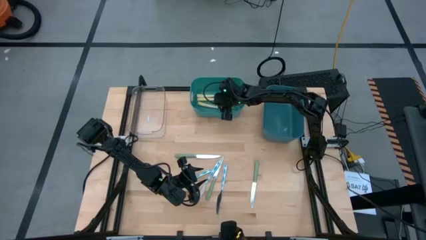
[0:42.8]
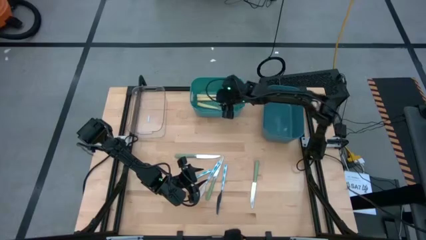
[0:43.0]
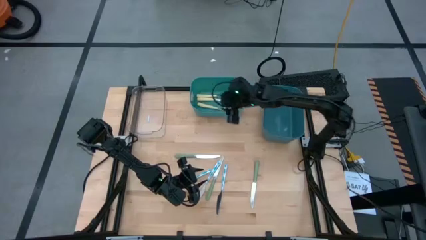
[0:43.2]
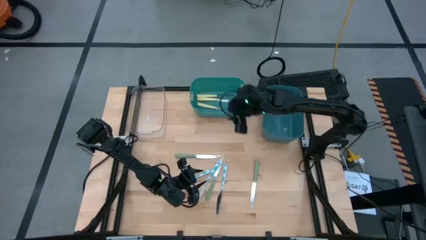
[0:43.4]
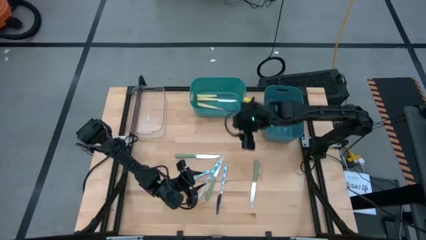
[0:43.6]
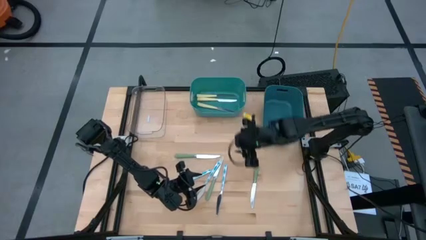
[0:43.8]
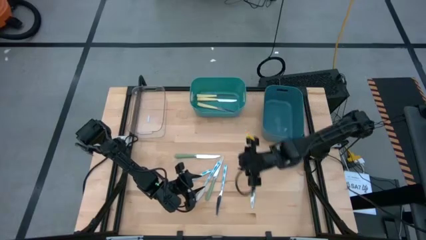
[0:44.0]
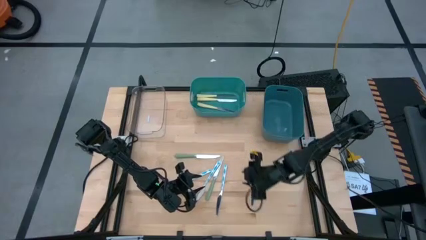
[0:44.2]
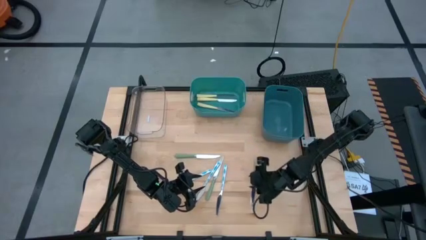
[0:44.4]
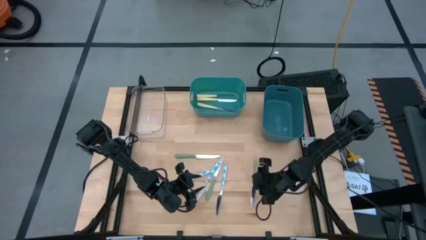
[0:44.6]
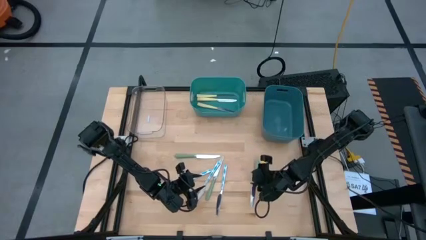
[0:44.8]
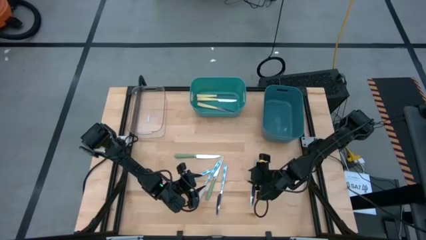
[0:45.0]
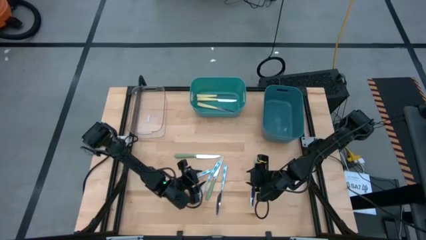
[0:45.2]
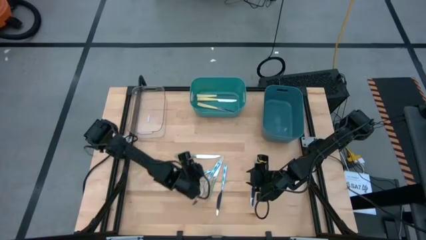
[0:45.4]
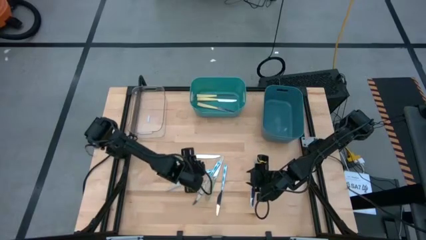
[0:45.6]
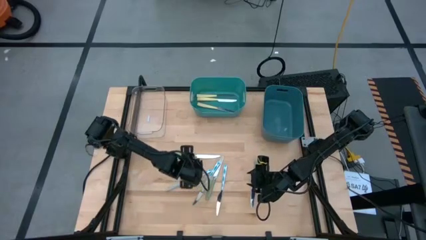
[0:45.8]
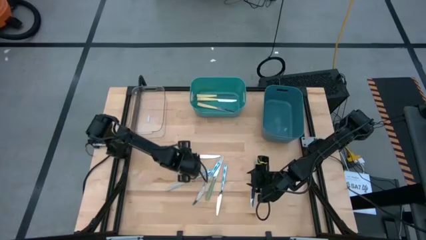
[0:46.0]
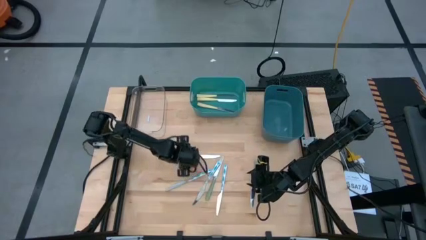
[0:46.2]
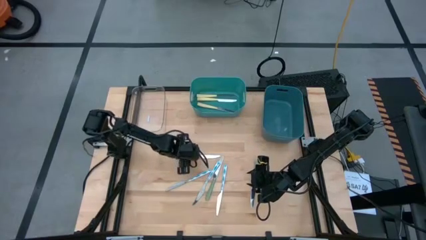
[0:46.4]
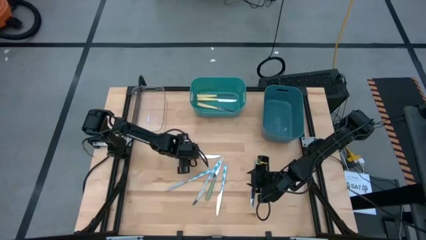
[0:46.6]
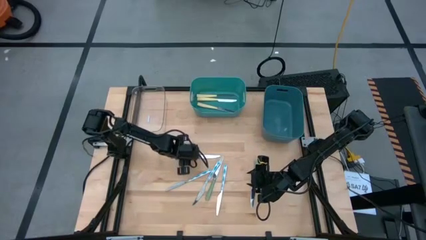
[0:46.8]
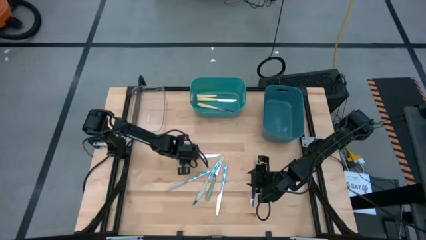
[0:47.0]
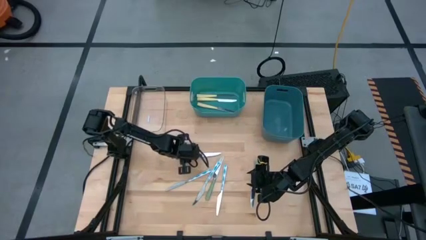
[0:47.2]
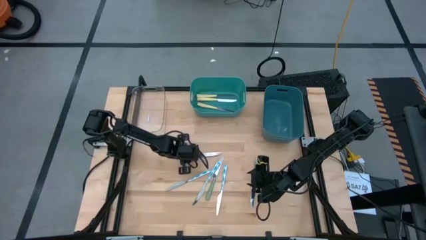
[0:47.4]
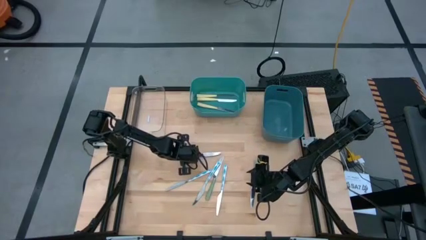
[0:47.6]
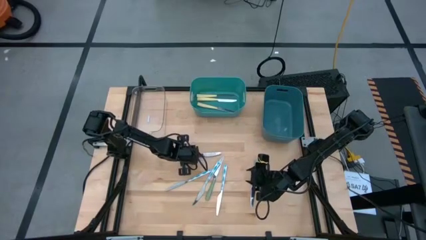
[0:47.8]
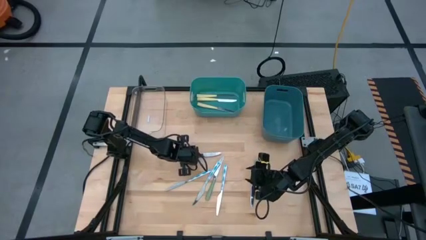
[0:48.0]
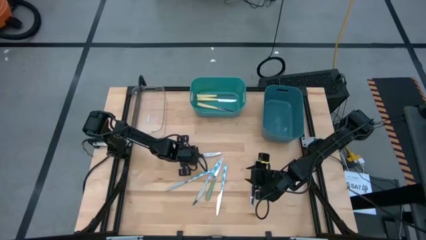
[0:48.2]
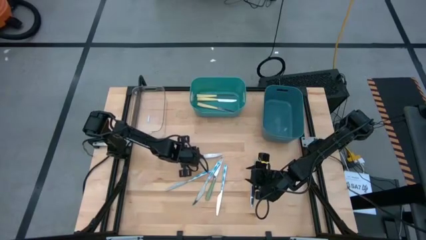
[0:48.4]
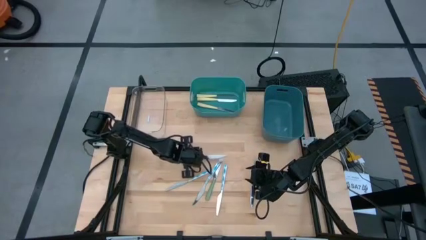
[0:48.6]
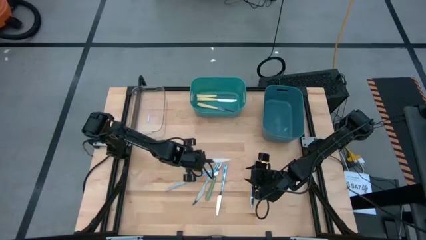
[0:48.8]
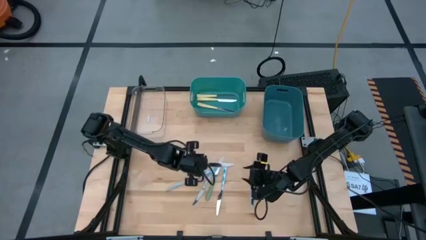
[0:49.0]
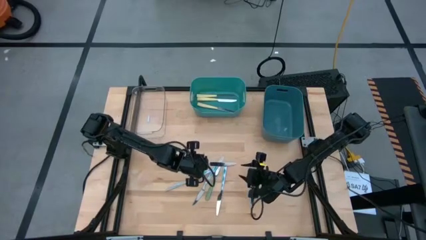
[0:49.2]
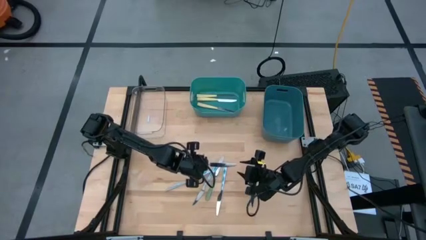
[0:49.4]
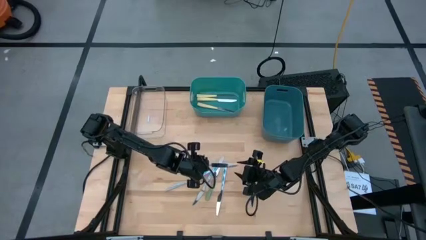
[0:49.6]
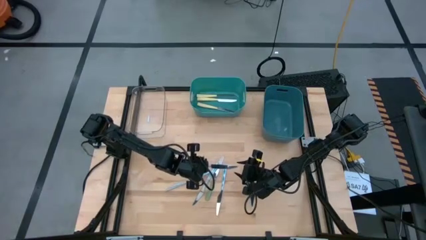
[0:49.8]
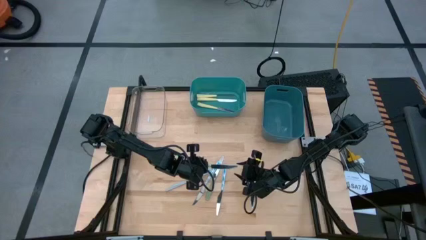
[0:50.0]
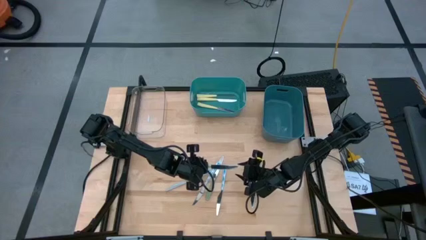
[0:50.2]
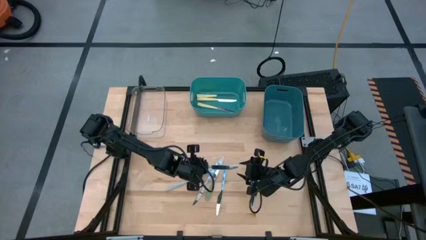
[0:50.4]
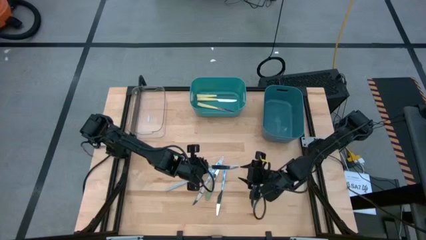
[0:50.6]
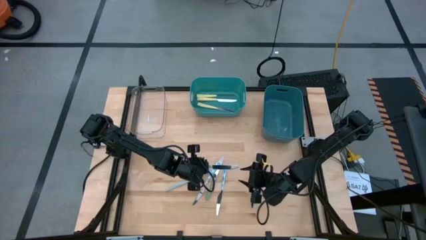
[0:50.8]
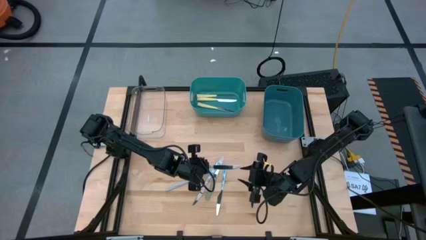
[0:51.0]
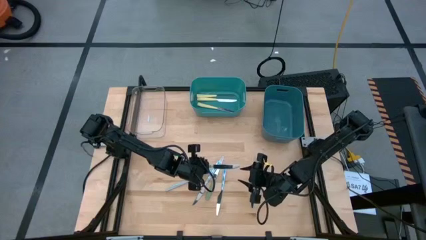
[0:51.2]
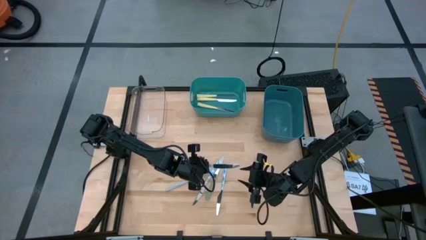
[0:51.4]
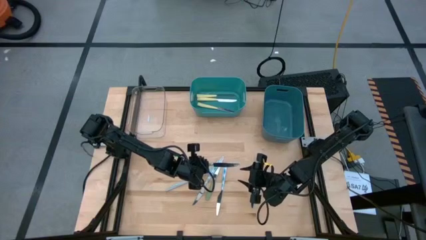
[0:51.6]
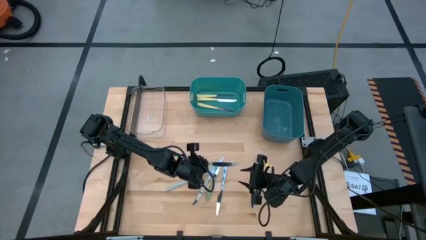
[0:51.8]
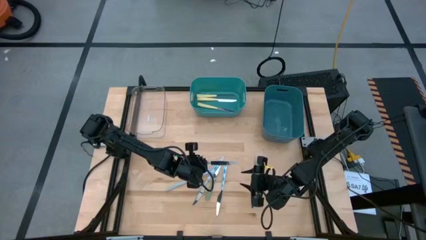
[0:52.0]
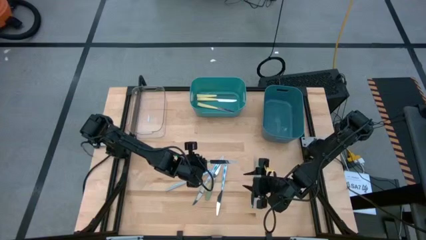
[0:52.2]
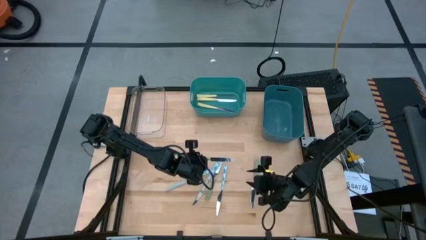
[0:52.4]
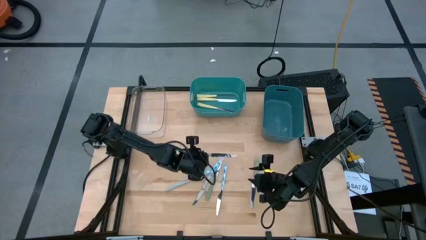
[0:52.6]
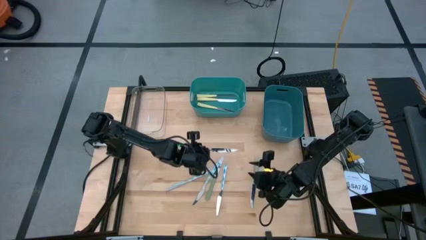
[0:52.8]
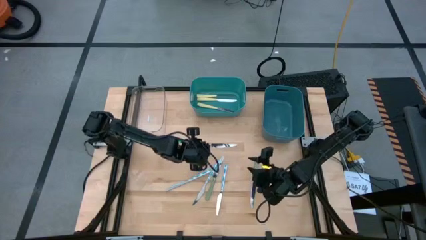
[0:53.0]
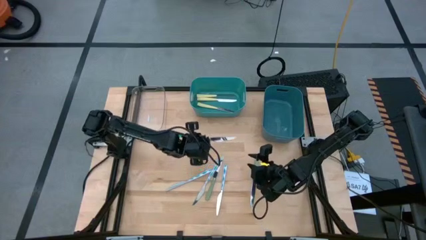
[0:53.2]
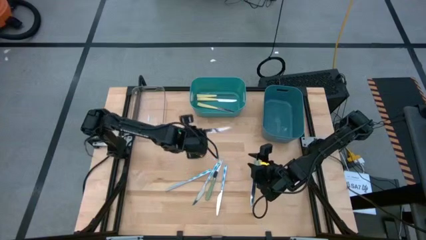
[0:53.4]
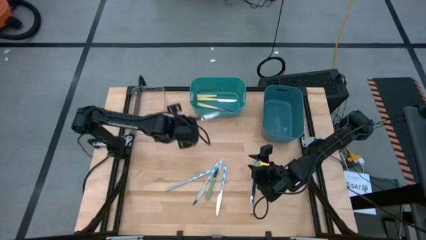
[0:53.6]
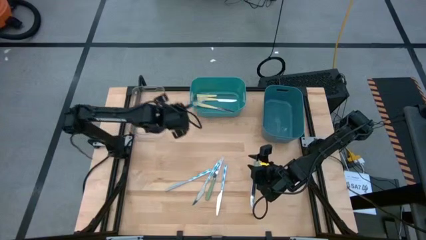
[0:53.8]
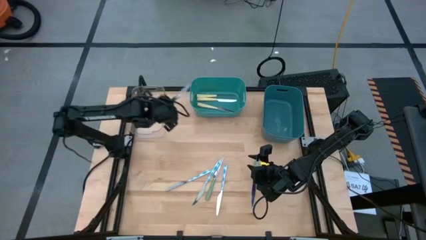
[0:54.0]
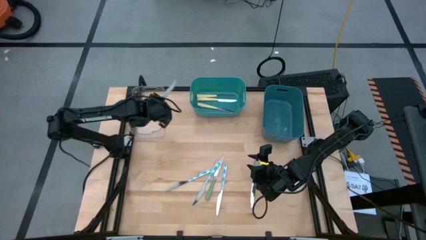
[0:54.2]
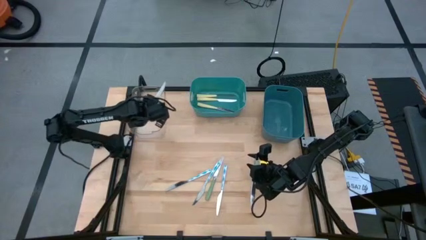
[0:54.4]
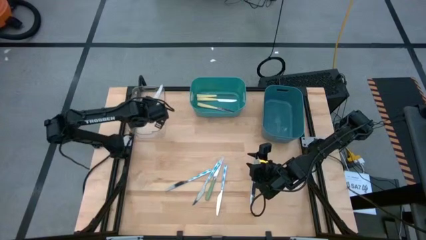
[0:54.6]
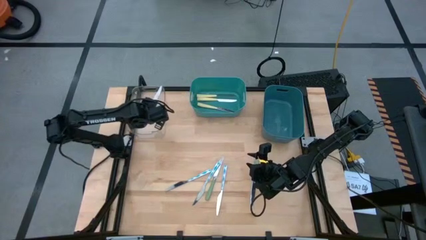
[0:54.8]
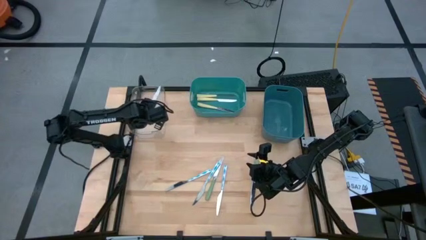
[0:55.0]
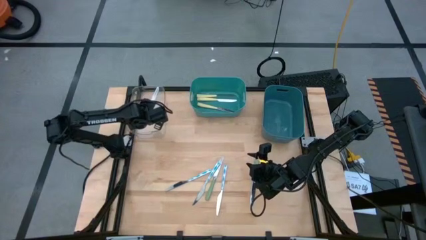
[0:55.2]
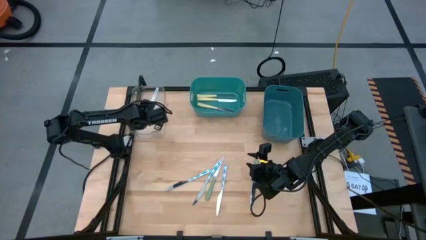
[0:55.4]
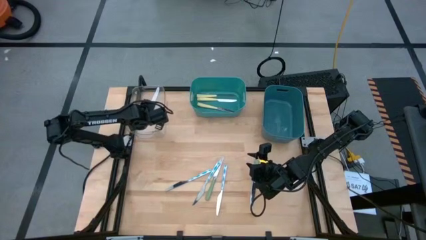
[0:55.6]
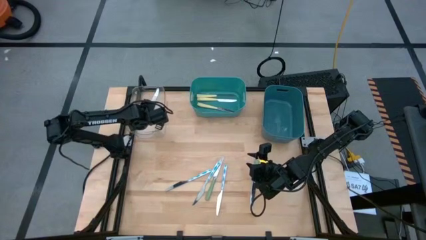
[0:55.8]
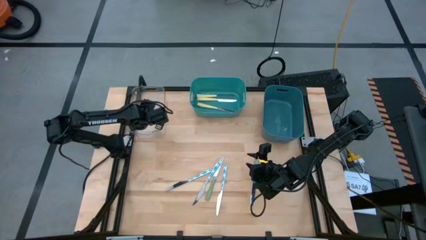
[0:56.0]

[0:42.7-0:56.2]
Task: Sort silverware by color (type)
Put the top green knife into the transparent bin

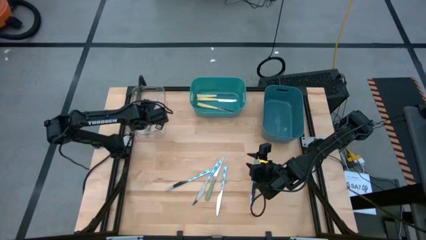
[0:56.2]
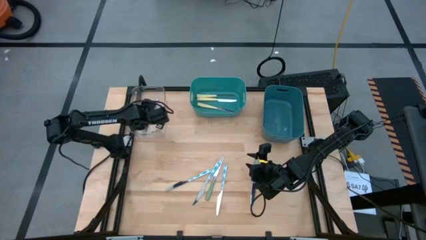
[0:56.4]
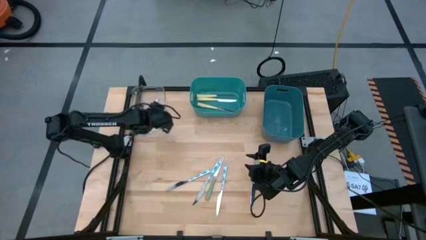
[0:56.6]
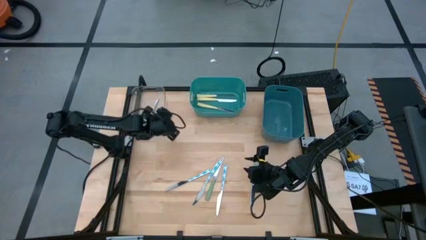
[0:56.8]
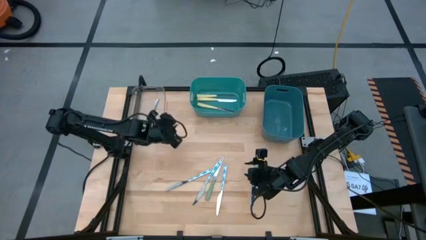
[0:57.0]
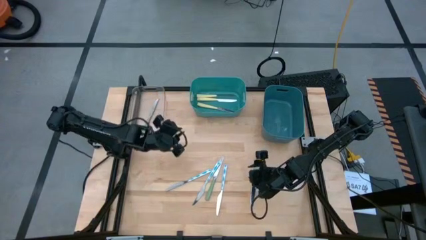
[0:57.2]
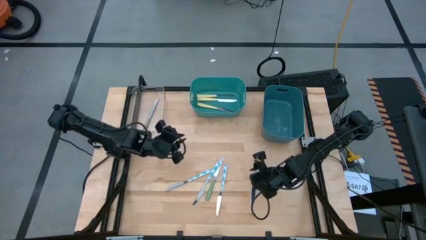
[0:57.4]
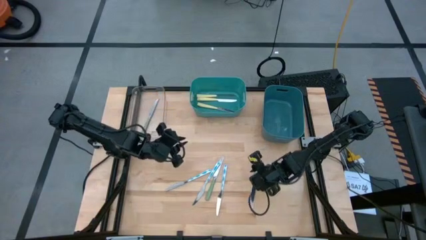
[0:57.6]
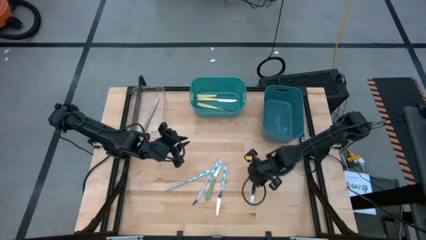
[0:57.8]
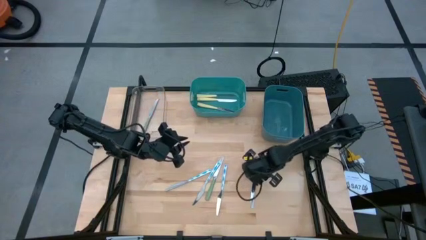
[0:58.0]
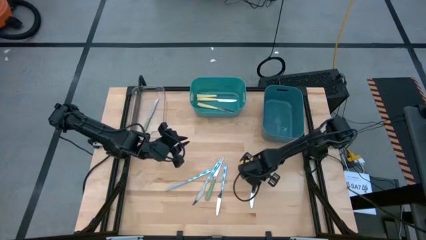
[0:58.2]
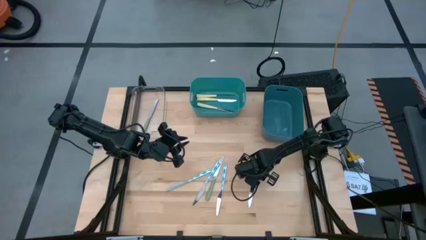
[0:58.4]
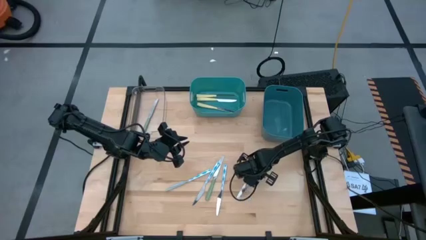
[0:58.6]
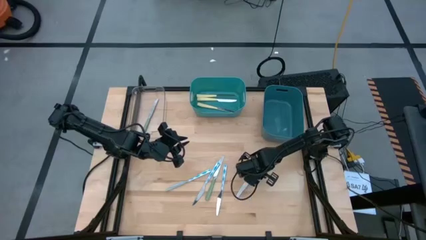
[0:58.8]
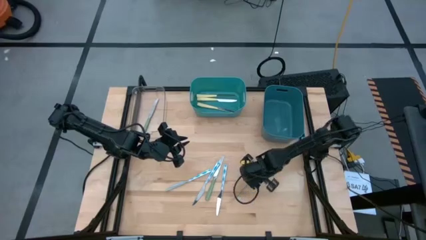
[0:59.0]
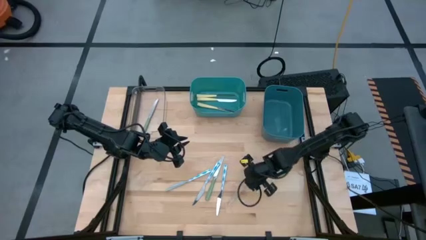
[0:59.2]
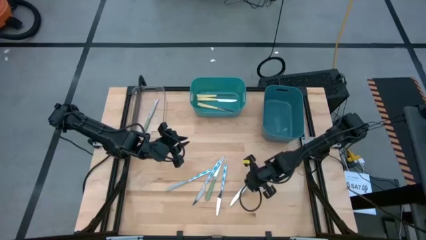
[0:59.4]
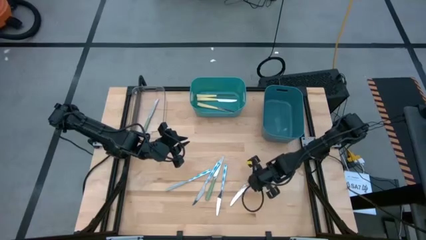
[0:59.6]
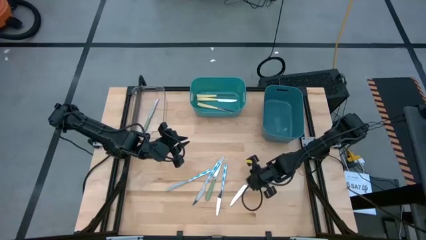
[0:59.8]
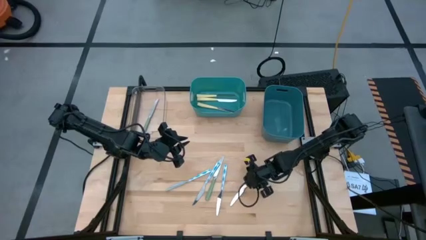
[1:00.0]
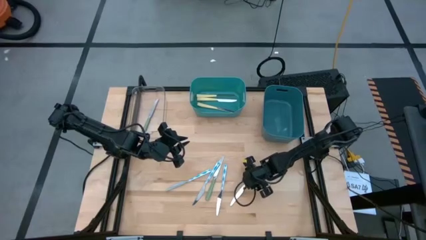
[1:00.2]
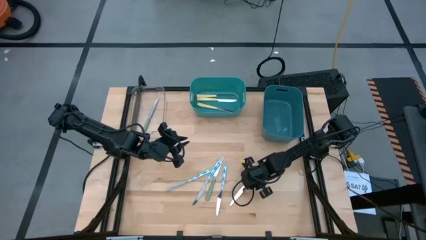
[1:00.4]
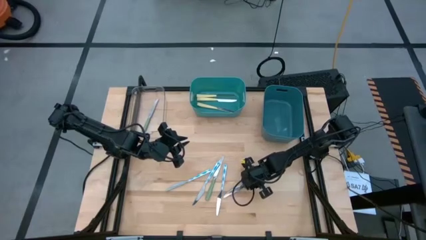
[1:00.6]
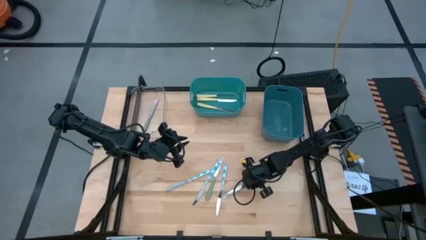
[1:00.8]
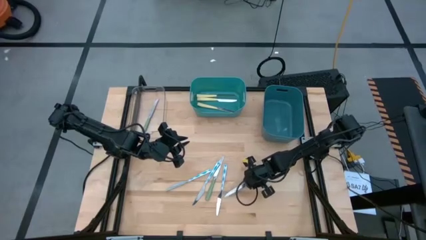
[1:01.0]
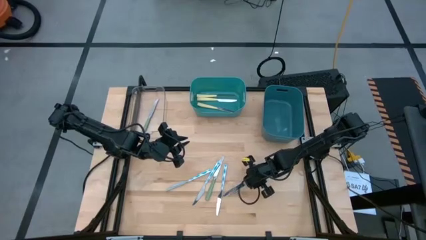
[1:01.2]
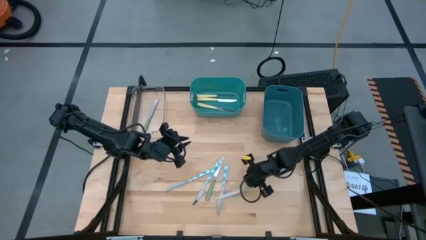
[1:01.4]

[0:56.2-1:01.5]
Put the right green knife into the transparent bin
